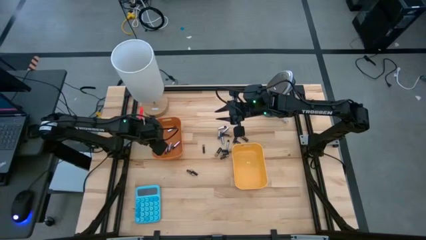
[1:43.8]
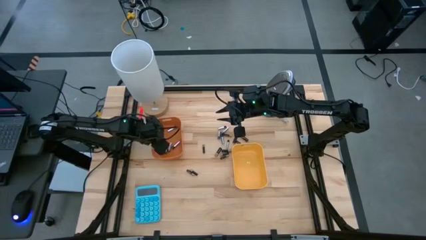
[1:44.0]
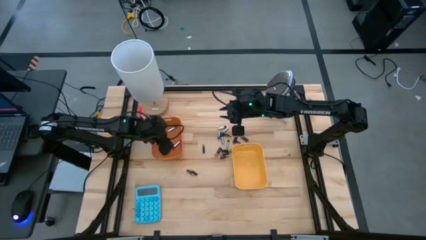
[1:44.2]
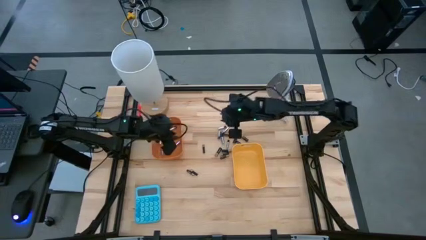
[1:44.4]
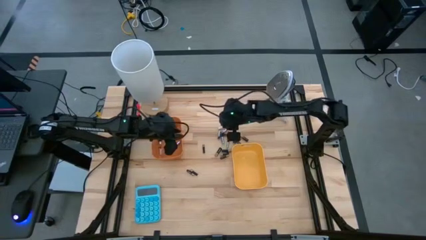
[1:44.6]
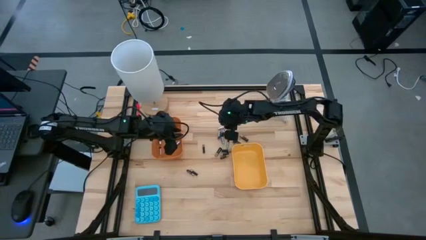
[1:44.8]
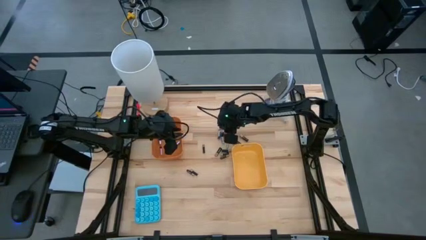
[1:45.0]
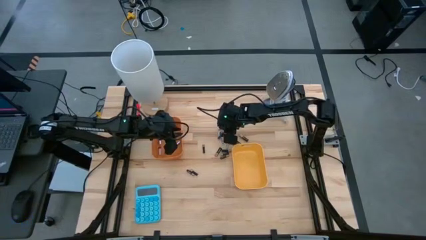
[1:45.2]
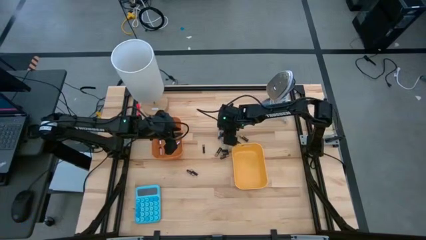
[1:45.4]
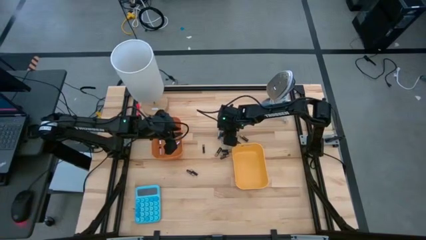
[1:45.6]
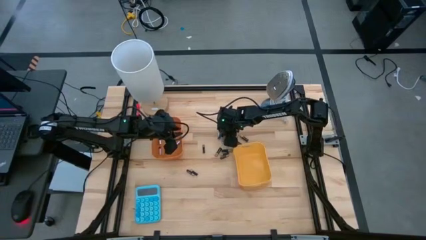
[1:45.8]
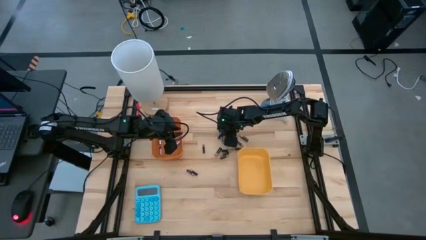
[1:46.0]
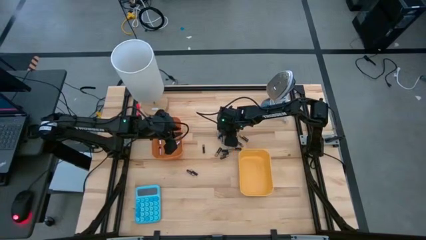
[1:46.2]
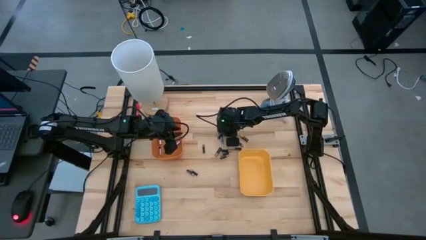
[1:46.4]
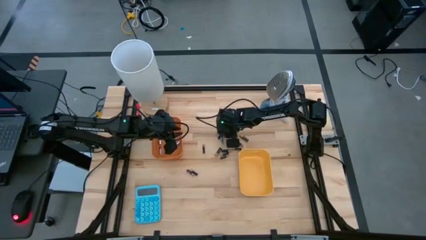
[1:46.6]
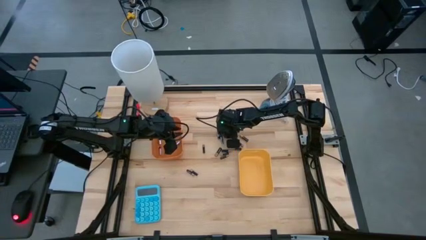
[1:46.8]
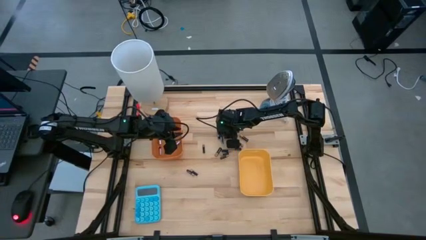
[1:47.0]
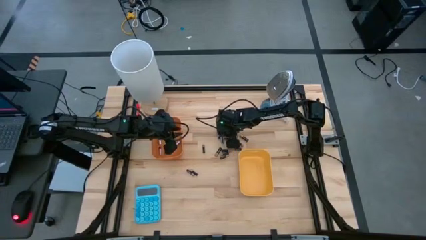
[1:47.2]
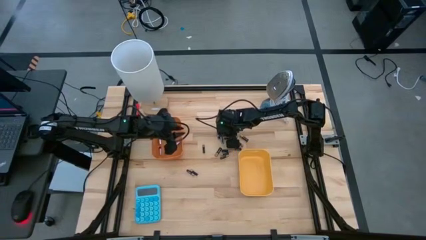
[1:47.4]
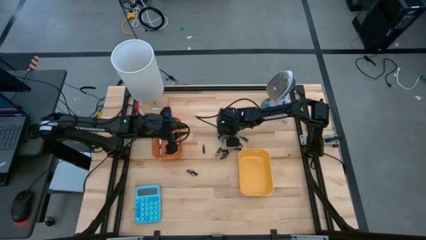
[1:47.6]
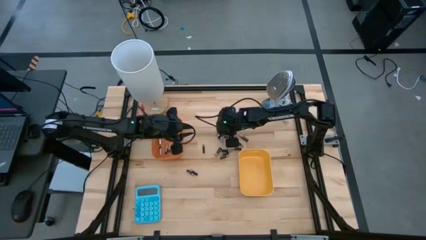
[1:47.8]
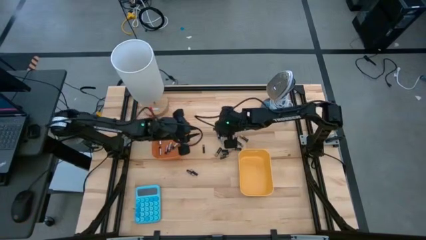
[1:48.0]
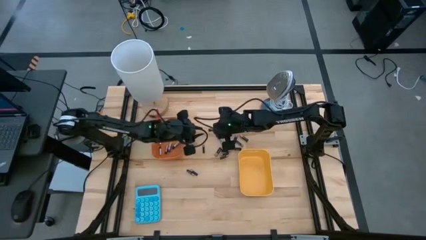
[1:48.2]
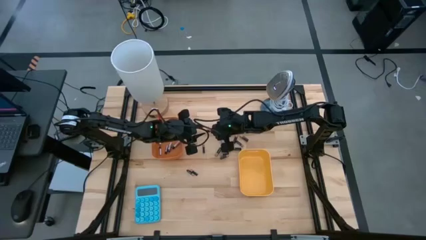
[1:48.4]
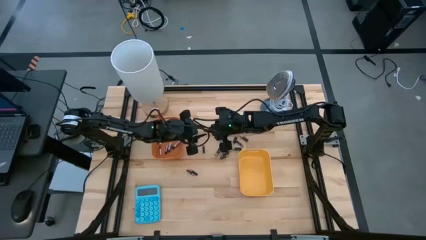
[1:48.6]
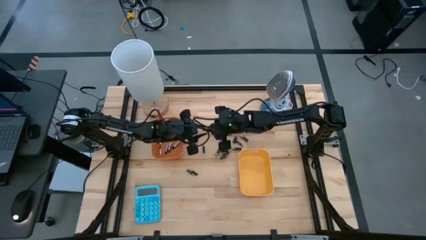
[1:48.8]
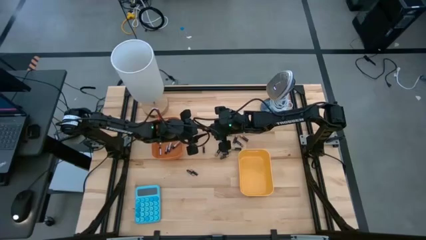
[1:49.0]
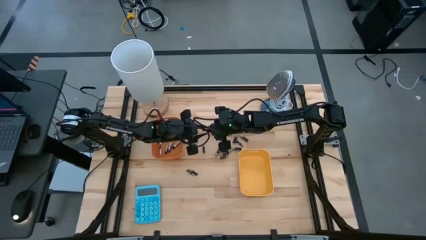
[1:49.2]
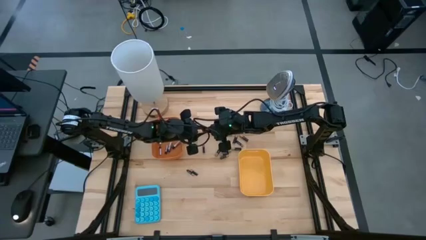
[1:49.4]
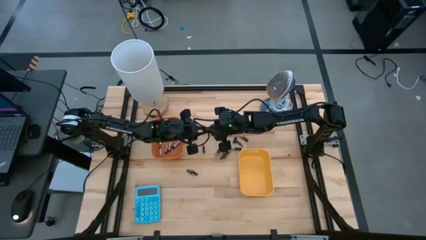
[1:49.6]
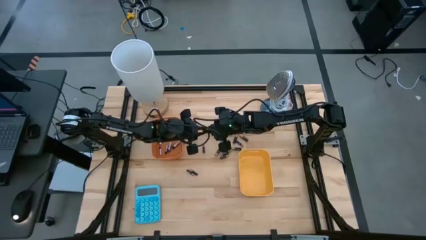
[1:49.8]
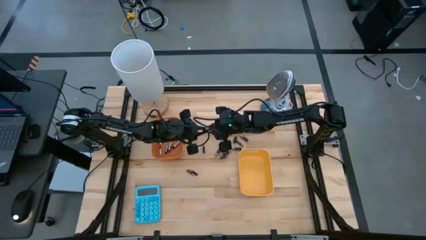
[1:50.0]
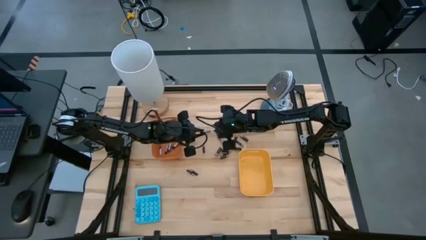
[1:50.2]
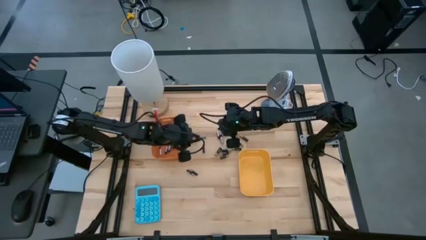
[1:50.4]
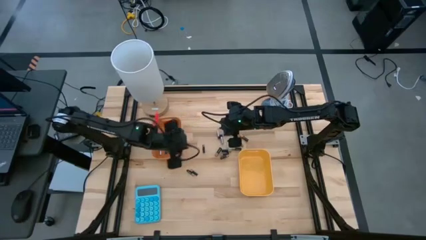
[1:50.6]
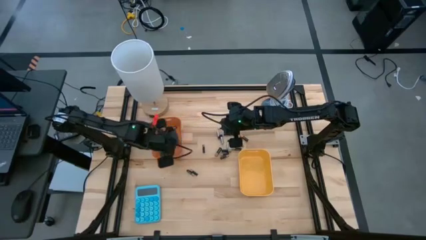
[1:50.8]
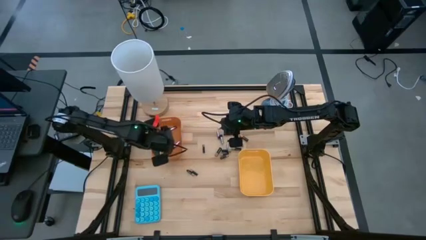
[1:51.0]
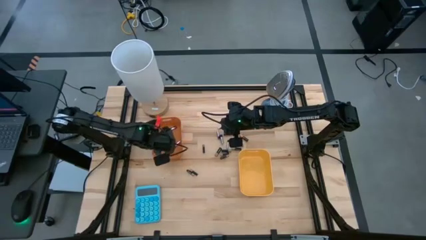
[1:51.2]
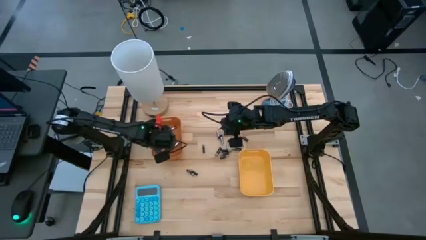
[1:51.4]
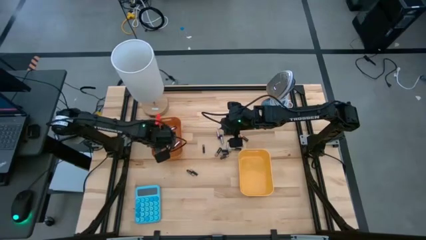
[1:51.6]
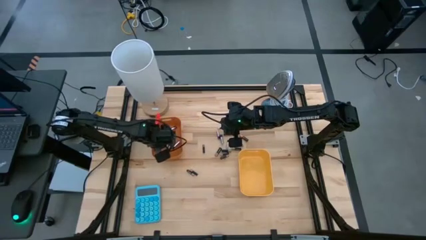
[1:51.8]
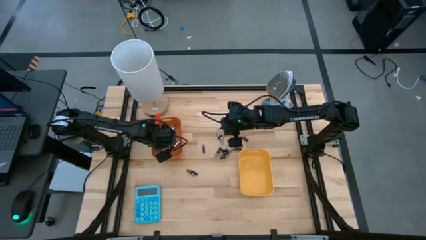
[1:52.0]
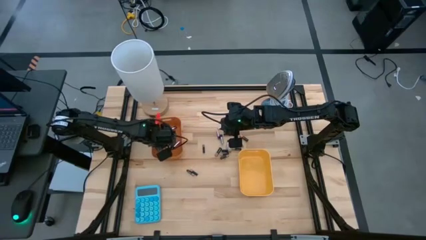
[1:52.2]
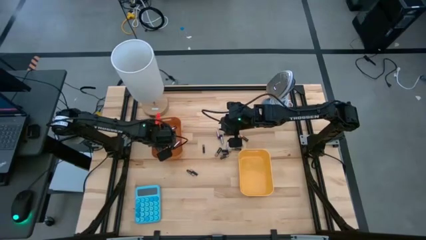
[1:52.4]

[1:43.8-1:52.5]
Task: Sort batteries
Put the silver battery into the orange bin

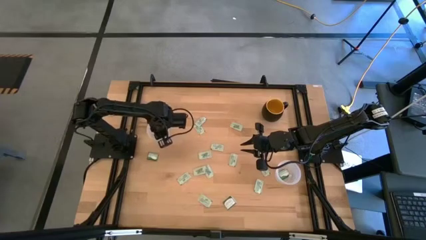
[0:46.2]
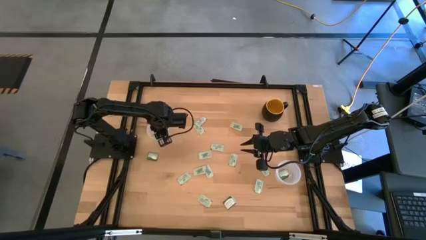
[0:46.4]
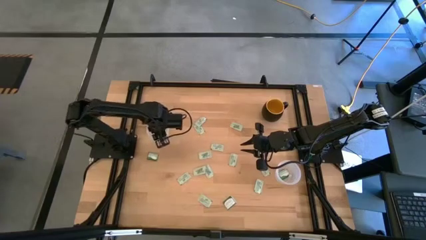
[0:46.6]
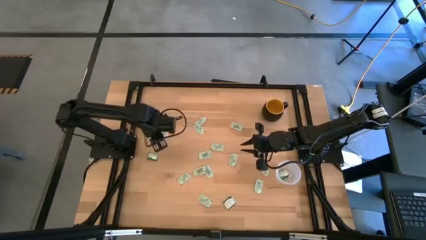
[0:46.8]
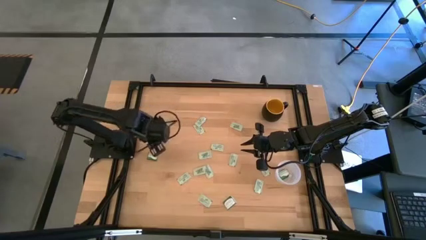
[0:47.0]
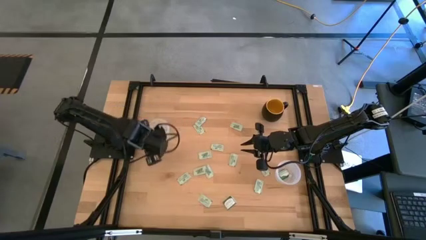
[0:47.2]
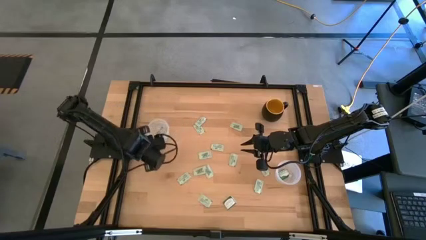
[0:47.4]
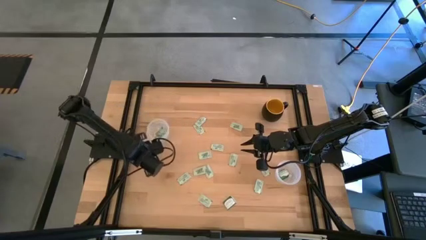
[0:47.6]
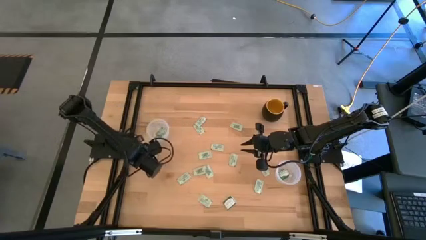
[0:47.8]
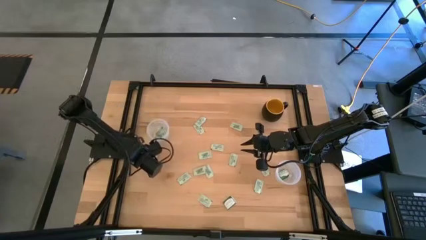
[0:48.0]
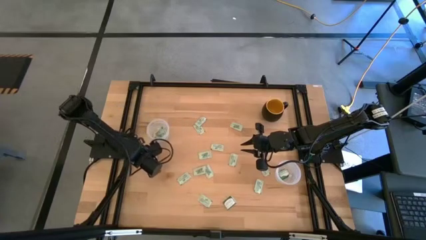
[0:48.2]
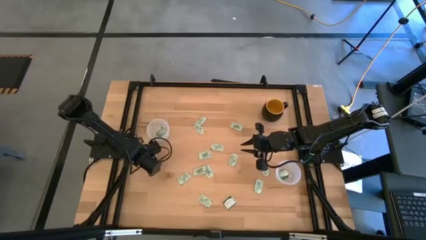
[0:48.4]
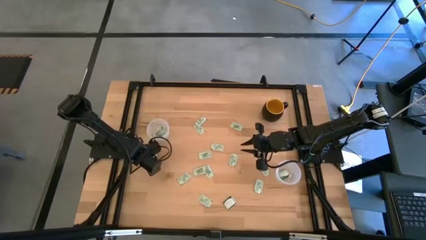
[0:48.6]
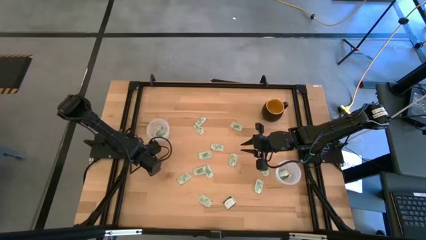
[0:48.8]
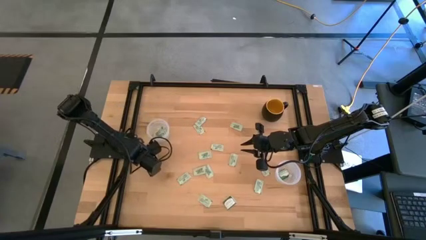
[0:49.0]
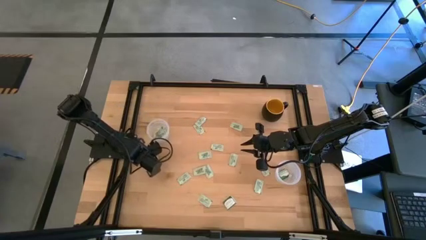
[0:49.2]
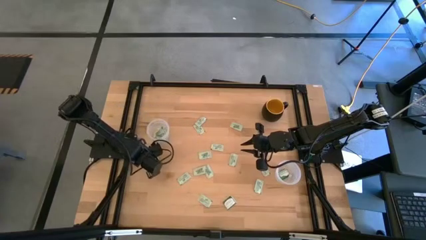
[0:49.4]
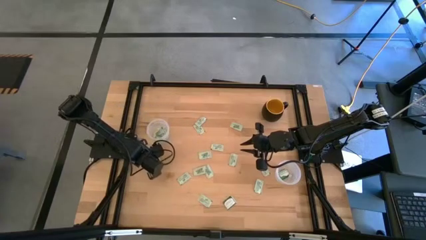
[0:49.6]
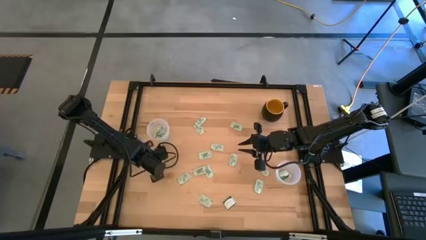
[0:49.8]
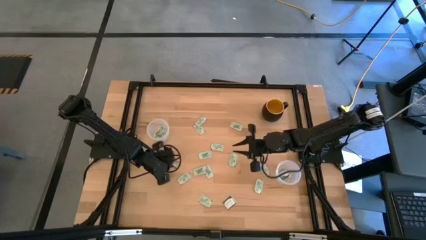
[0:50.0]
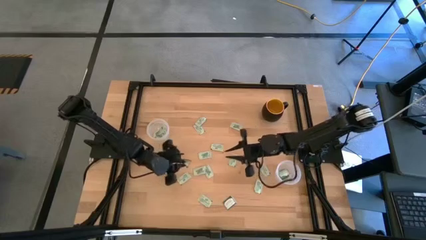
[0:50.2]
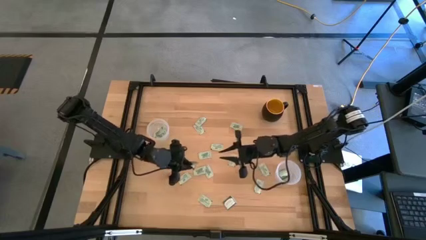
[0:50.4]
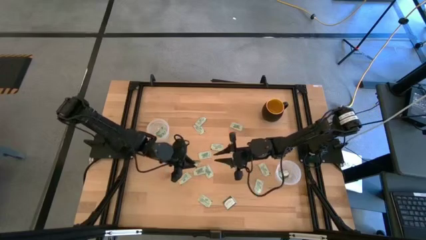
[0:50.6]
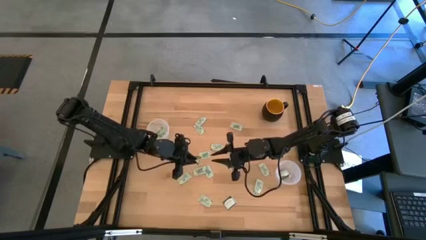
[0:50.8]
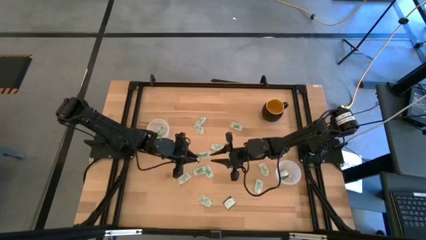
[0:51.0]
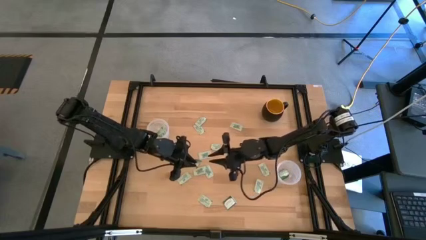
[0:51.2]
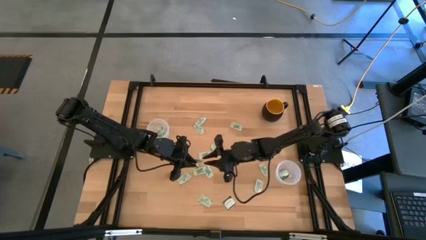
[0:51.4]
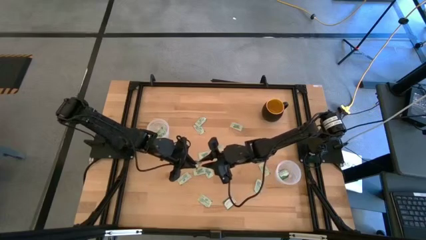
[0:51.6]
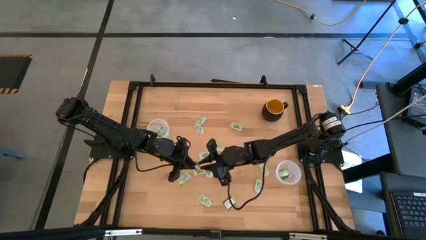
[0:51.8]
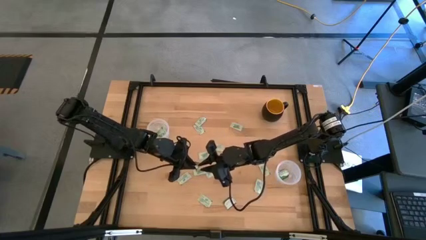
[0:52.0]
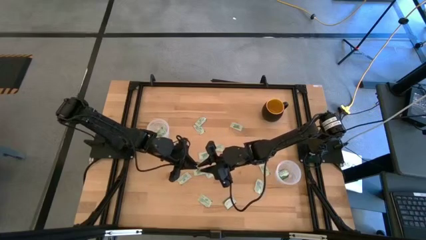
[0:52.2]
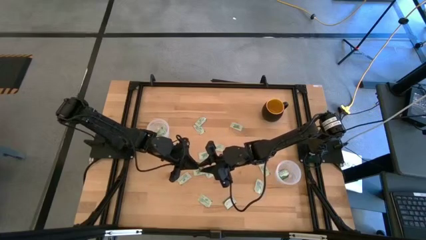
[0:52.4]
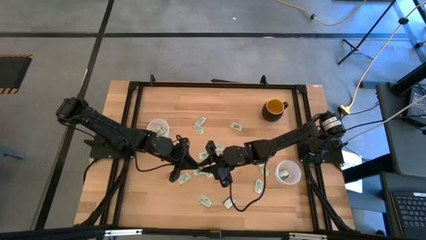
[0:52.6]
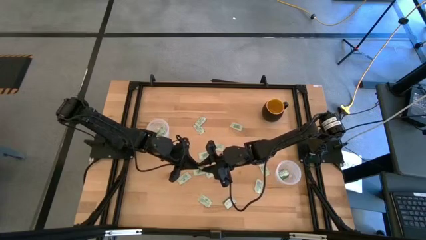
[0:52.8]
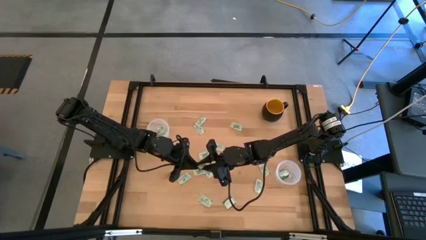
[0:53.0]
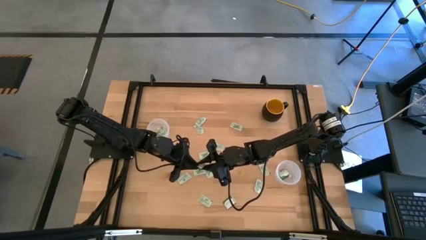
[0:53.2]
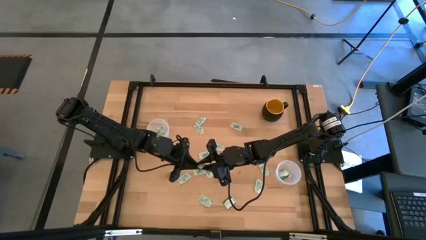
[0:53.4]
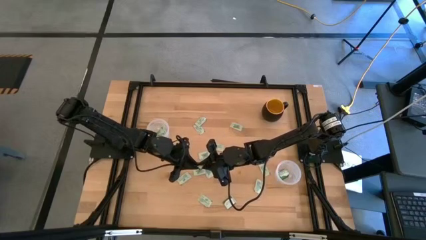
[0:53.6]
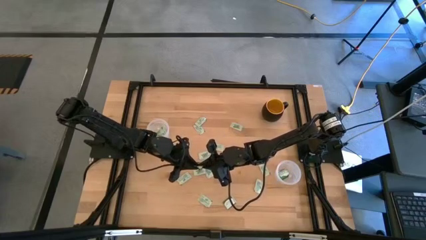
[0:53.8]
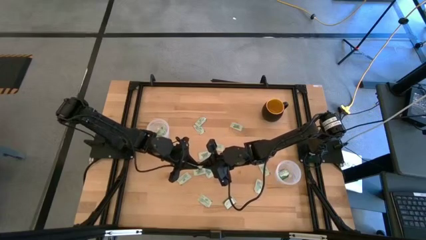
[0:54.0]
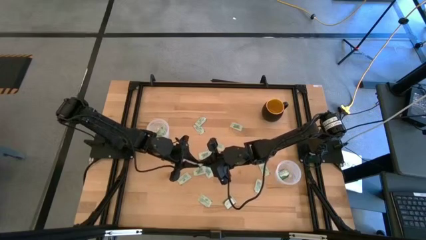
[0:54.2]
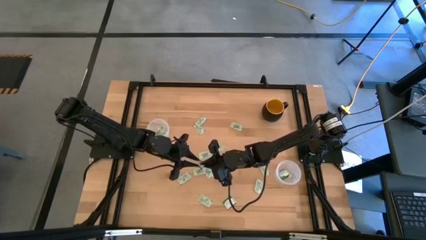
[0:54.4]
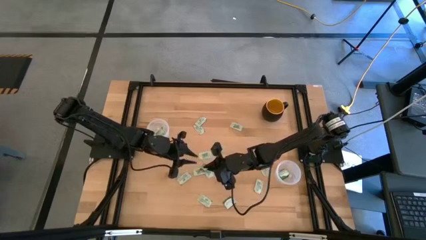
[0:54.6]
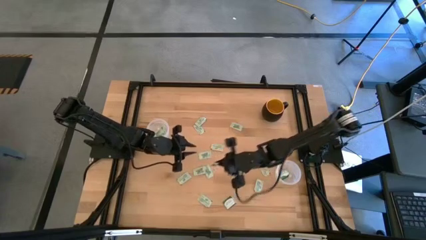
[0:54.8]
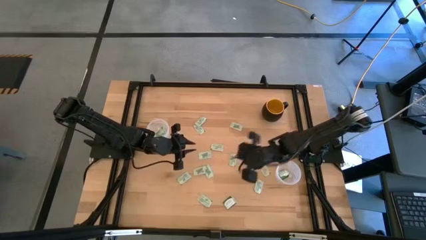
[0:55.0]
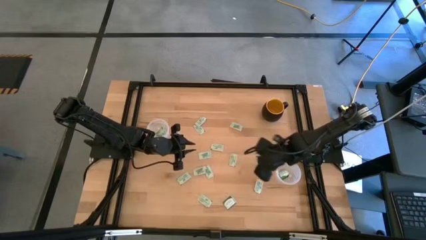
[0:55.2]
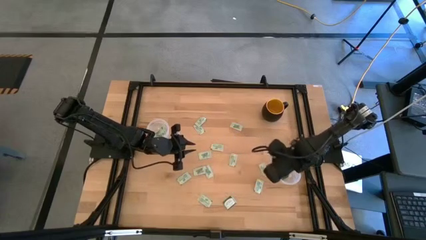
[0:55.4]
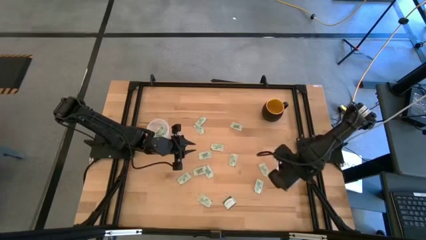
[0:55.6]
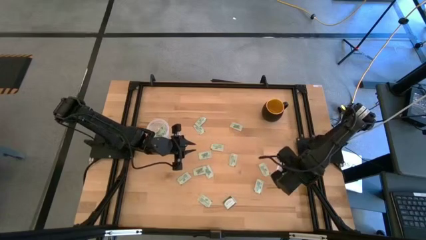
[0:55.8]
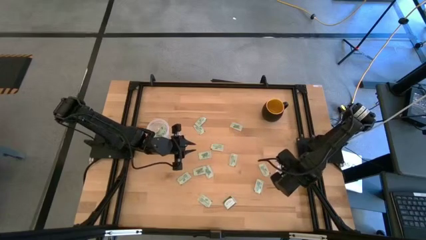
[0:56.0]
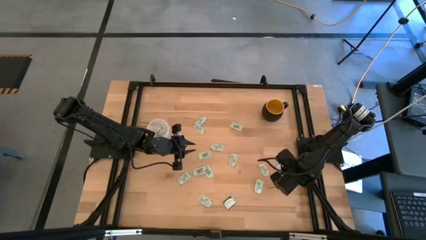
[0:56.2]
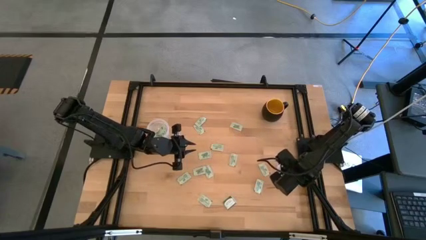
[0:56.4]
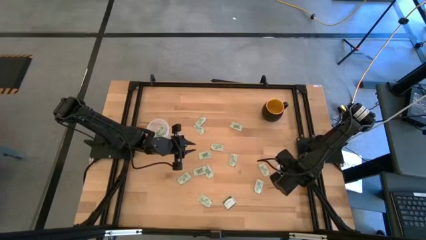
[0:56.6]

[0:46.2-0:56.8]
Task: Pick and place Stevia / Truvia into bins
Put the green stevia packet into the right transparent container
